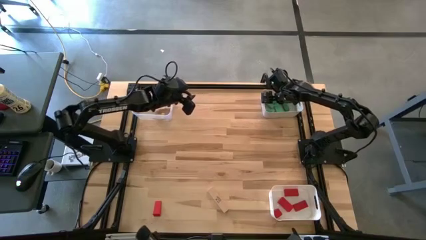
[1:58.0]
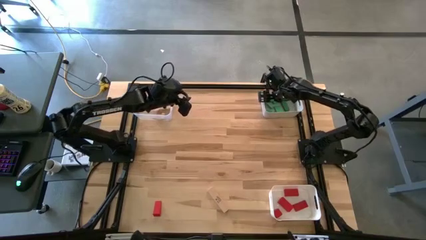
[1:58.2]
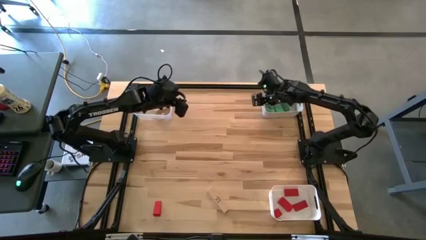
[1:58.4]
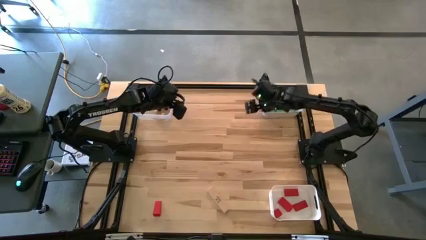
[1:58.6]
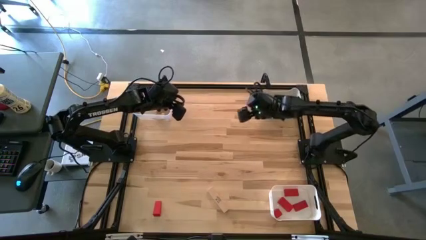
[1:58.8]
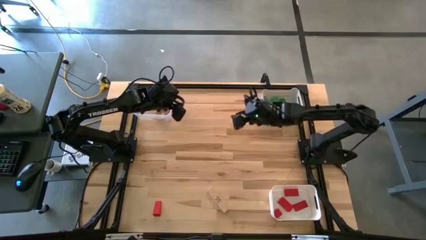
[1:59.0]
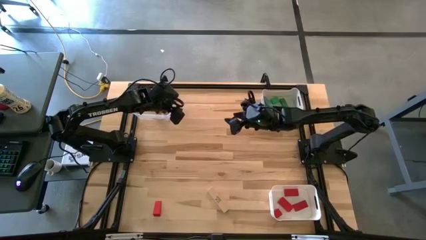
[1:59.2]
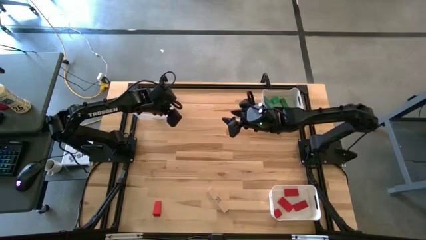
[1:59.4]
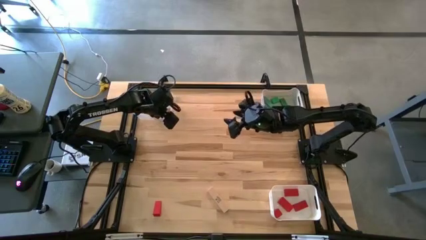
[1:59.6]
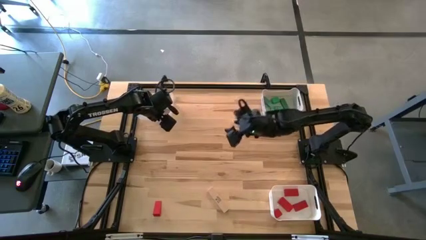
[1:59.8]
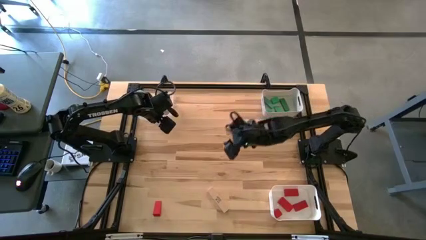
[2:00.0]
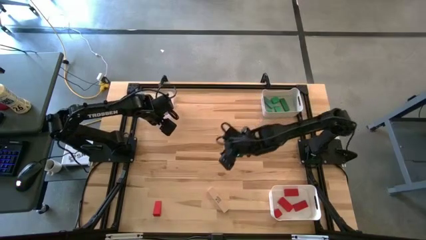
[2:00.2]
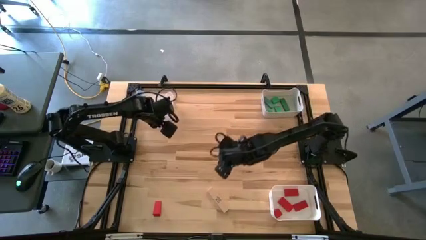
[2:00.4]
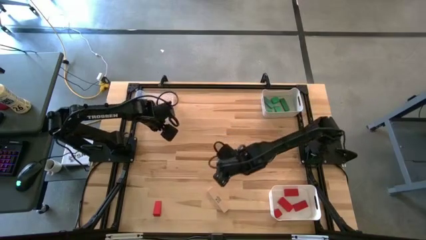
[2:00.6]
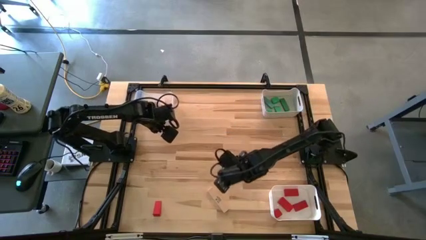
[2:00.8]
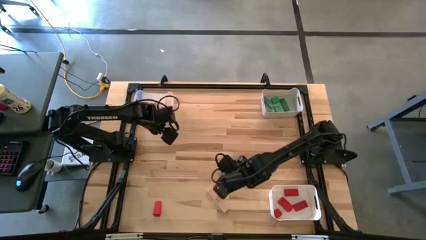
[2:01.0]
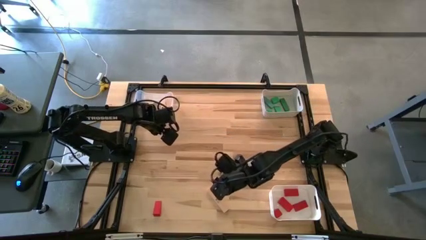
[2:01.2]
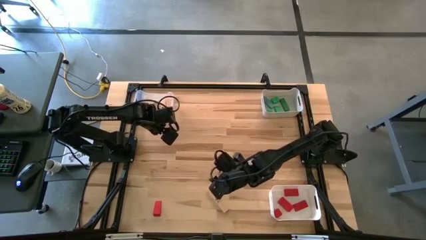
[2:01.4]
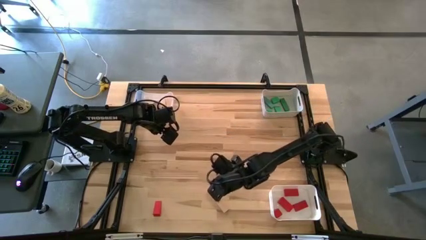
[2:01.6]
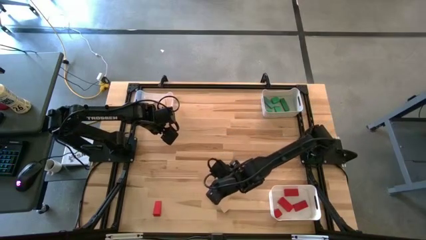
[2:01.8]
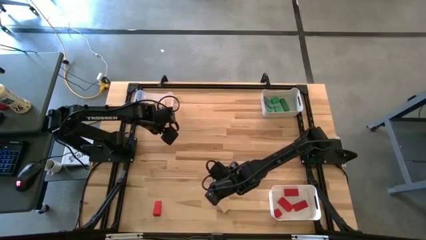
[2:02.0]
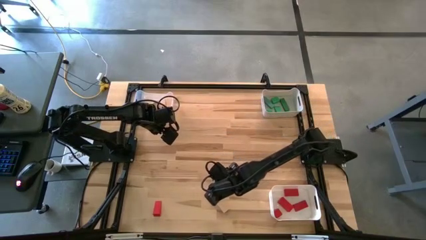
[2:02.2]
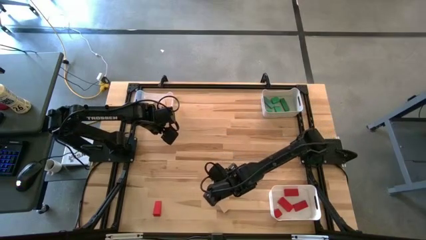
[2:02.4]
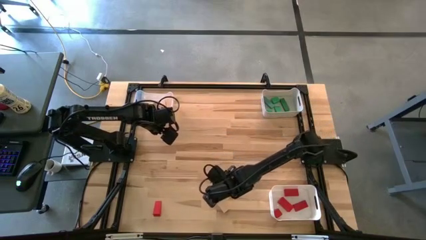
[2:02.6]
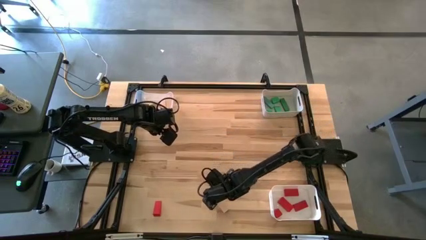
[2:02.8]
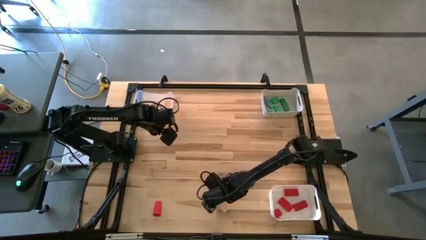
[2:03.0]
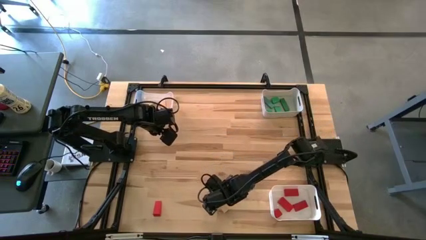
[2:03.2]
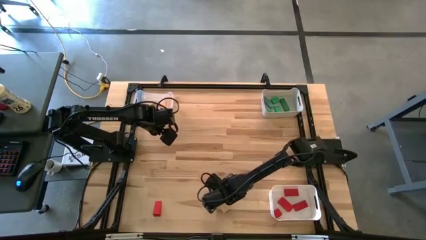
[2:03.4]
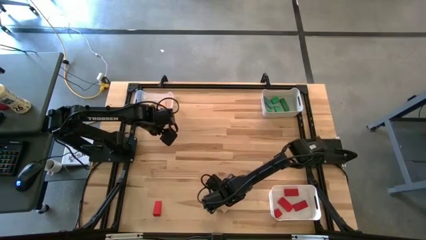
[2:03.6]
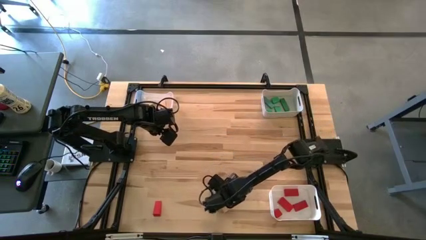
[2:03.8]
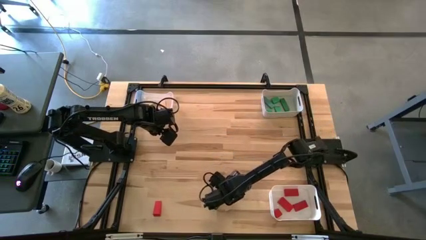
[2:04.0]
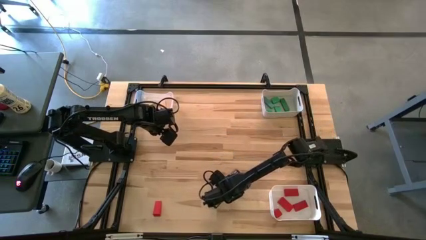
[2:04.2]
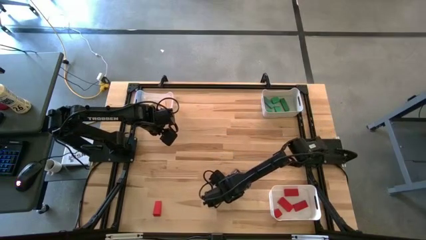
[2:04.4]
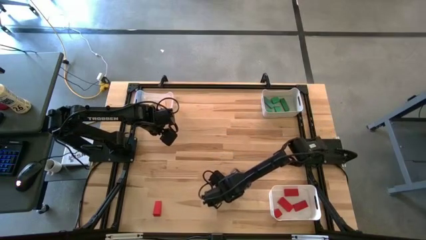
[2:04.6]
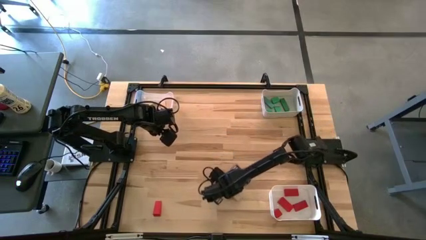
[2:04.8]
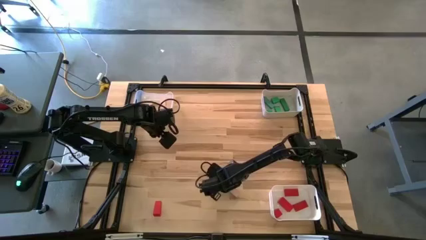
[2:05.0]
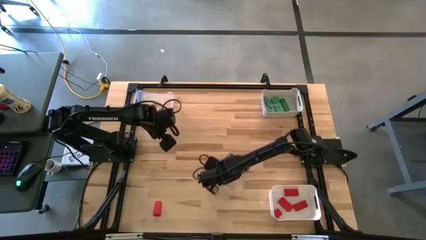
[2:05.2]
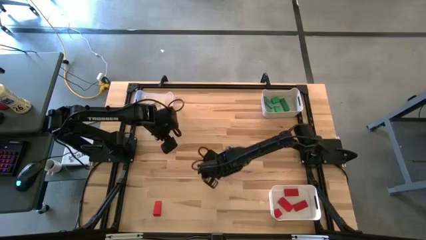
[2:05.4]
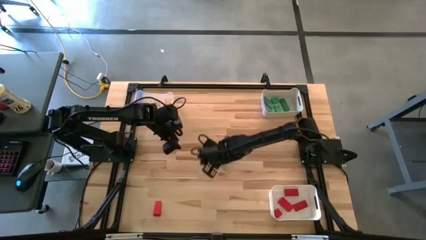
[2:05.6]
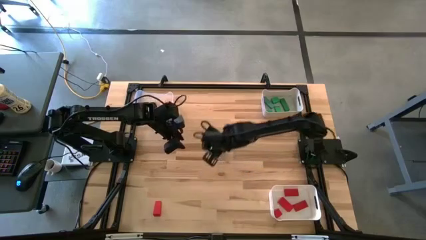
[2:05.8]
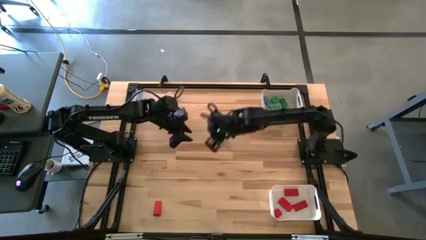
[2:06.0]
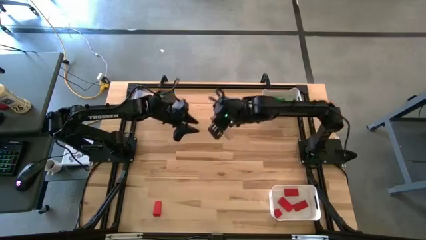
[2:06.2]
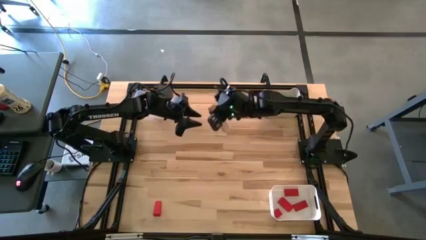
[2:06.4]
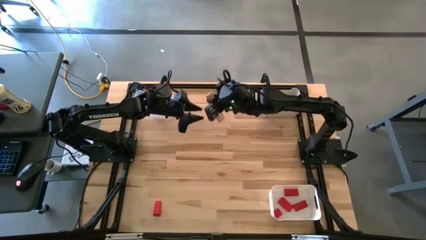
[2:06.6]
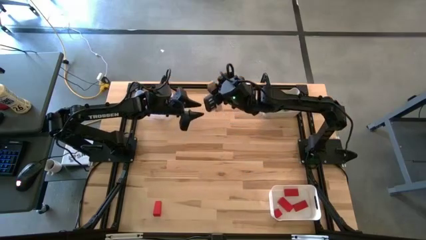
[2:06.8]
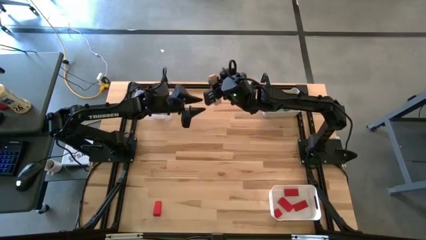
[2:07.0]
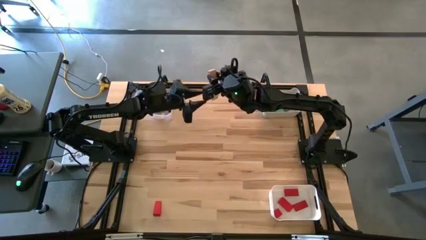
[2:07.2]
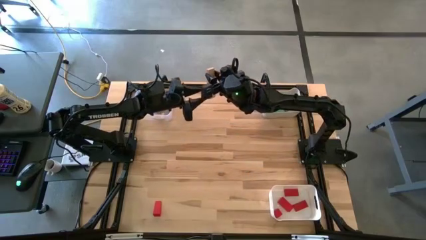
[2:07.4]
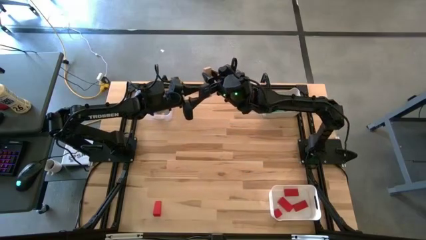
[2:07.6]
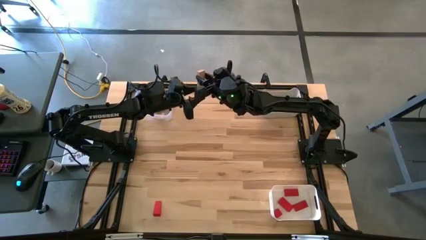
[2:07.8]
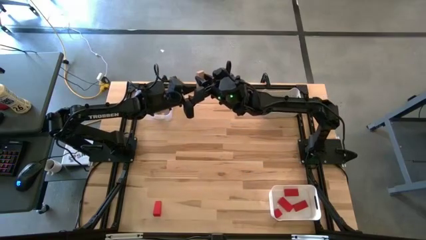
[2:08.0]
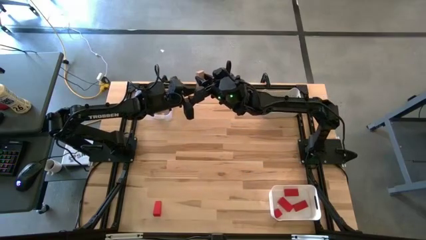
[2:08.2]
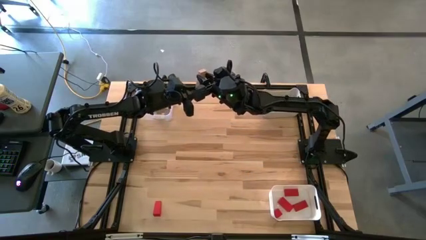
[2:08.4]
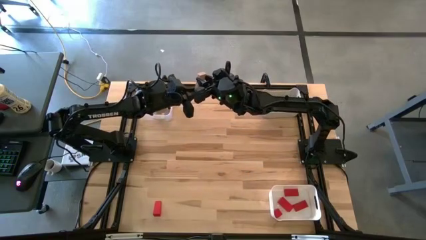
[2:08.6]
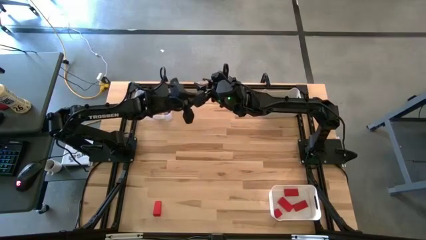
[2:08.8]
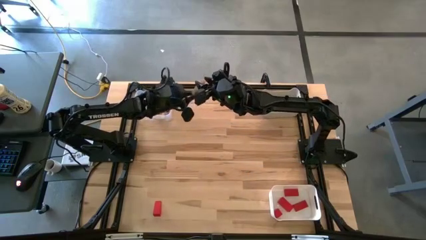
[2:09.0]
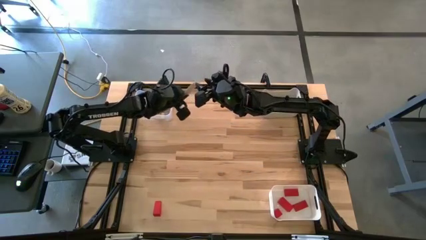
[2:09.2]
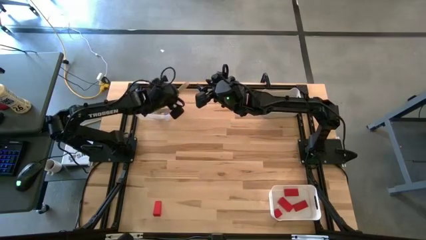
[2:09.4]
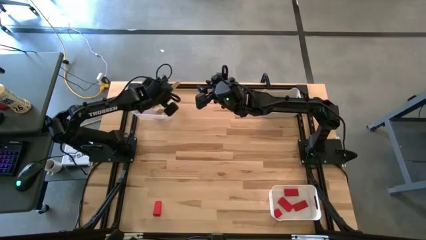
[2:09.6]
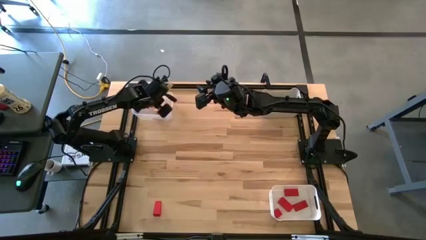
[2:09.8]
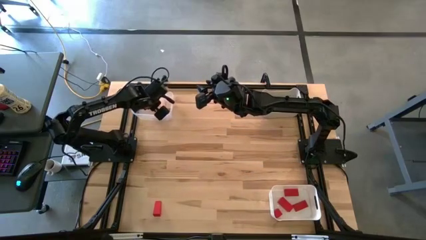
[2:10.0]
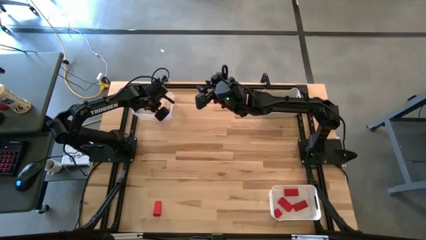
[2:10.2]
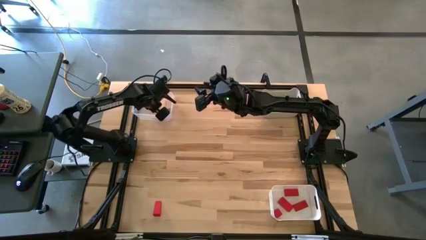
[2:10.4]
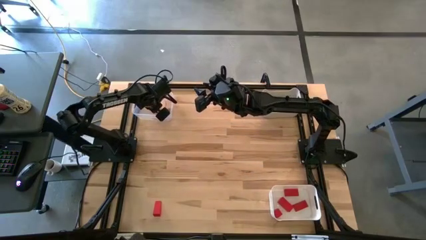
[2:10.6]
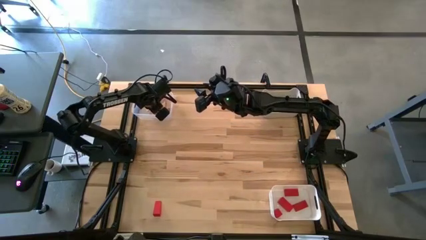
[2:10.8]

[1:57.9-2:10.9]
Task: Sort & place blocks by color
Put the brown block into the transparent bin

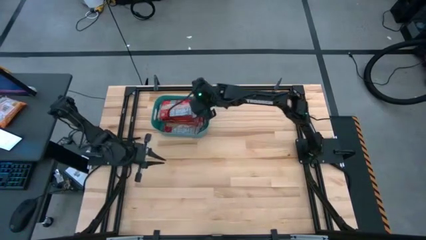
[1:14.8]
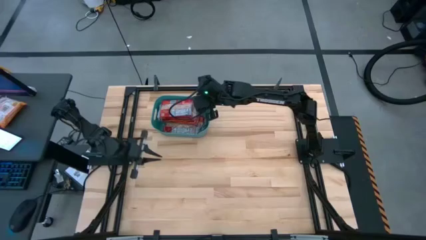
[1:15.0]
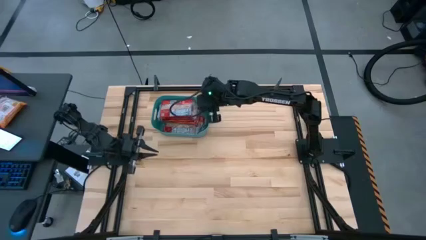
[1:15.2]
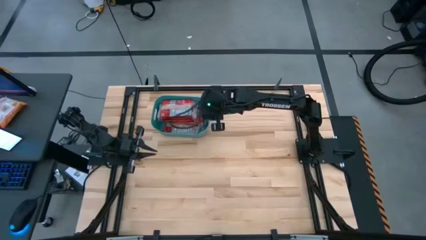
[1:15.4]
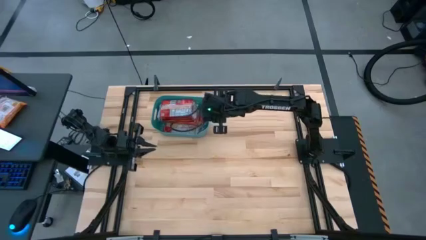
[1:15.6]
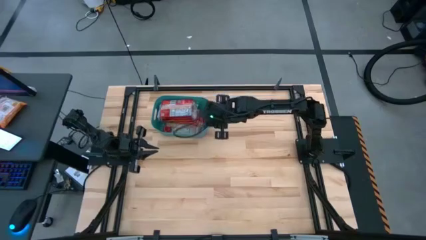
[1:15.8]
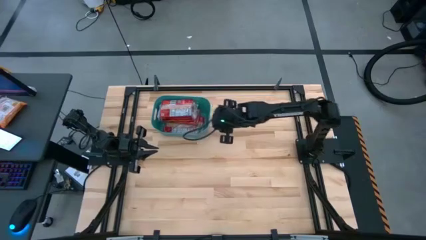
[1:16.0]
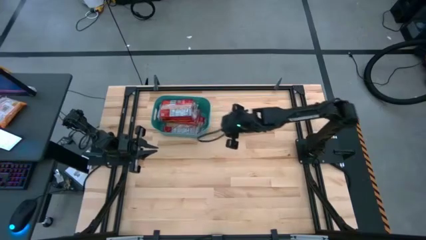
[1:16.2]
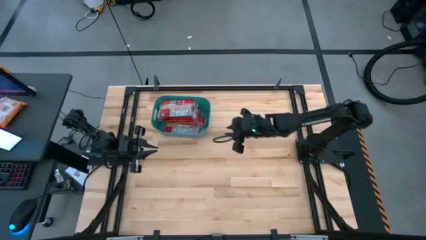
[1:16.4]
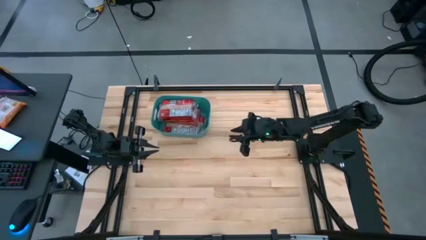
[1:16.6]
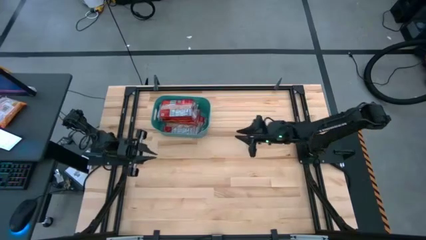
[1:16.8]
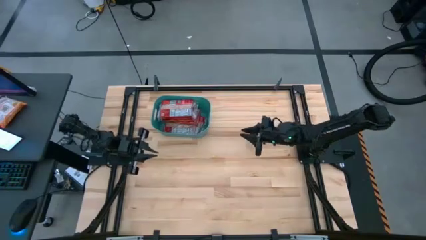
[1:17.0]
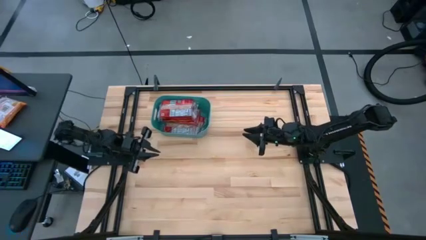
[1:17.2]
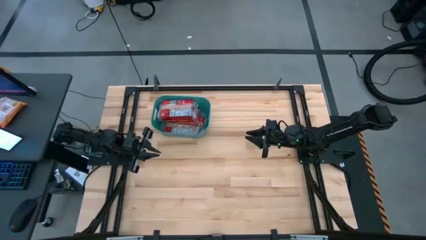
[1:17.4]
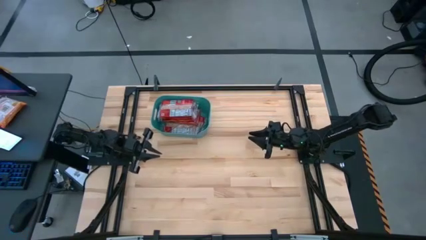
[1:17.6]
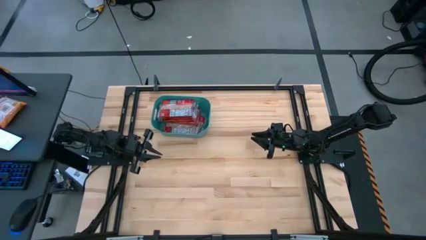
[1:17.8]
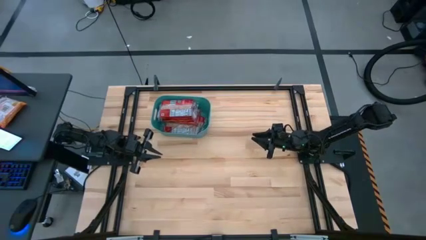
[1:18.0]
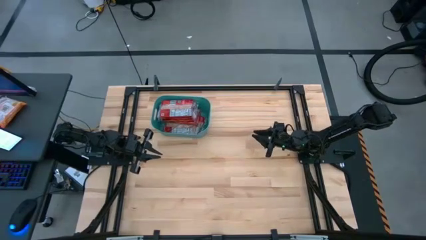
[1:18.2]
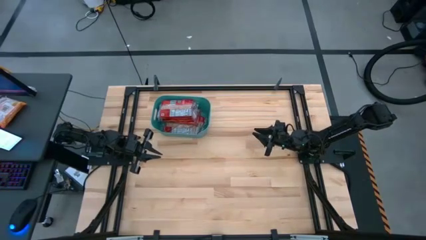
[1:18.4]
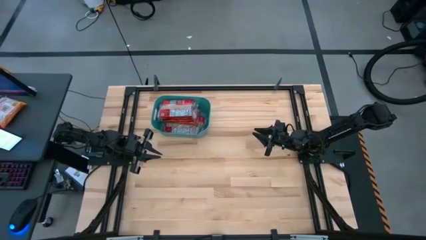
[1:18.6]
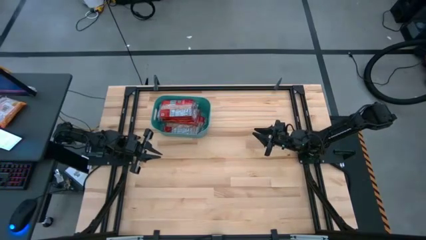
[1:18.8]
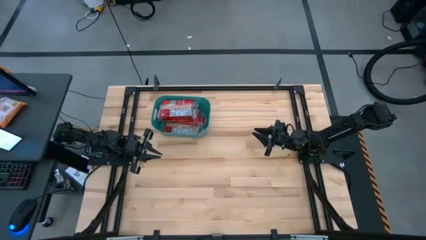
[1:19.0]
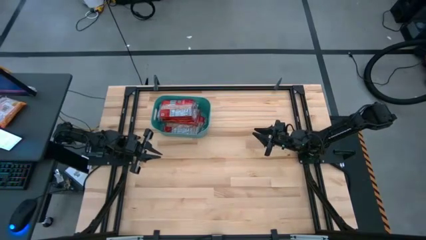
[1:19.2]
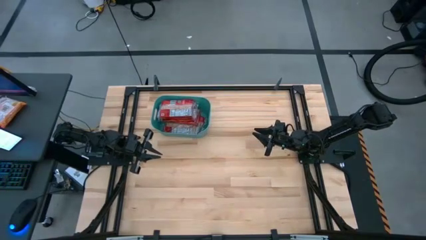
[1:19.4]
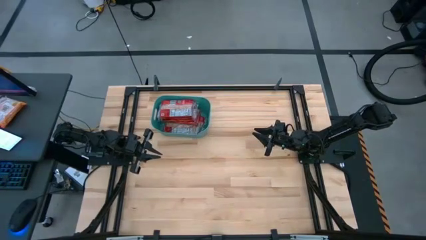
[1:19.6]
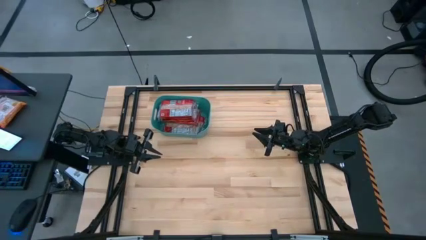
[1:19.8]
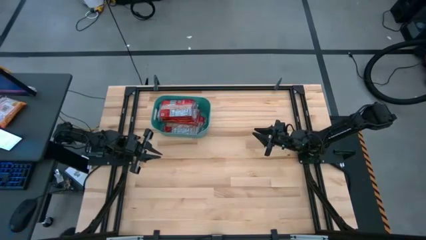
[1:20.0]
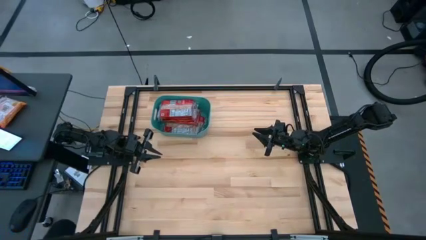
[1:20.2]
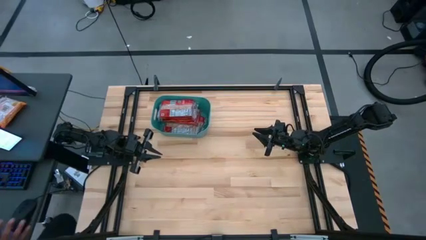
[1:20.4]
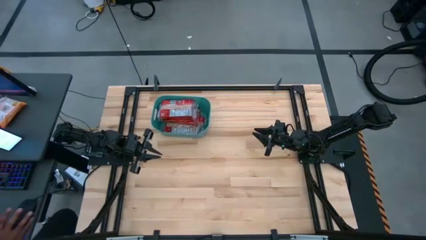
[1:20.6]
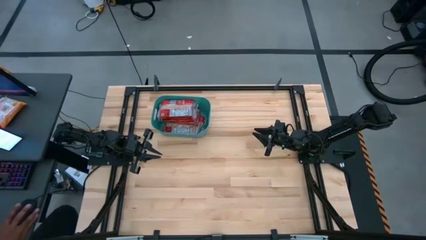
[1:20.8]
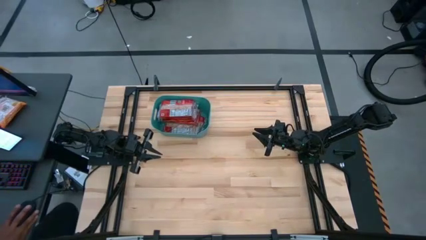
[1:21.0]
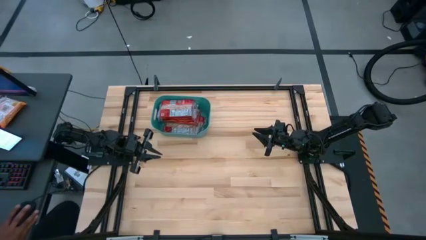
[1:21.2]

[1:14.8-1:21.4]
Task: Sort popcorn bags into baskets
Return to Home Position
